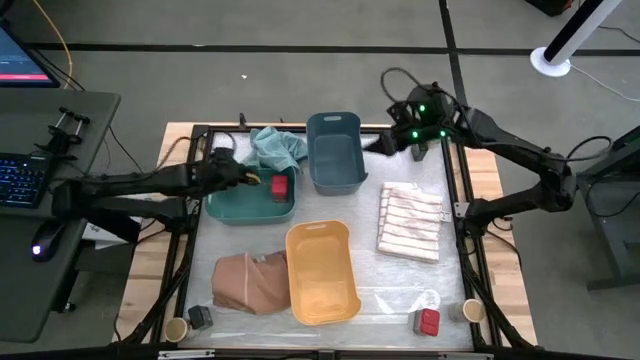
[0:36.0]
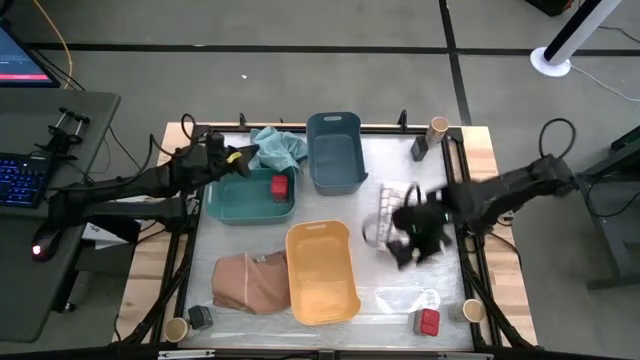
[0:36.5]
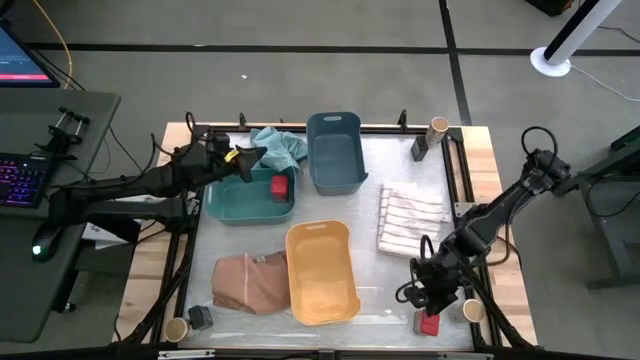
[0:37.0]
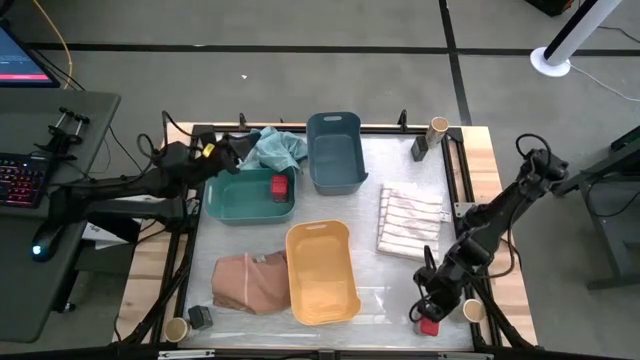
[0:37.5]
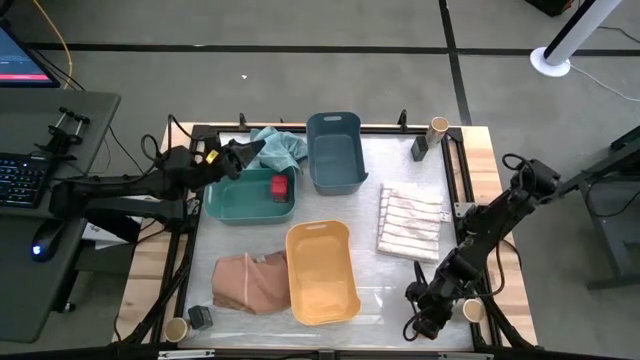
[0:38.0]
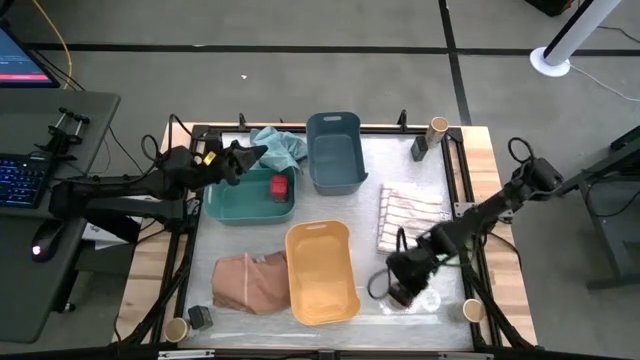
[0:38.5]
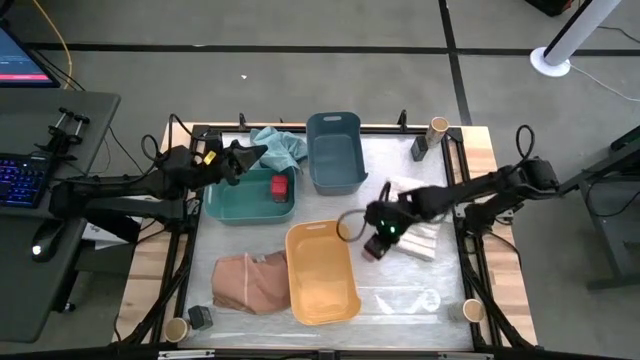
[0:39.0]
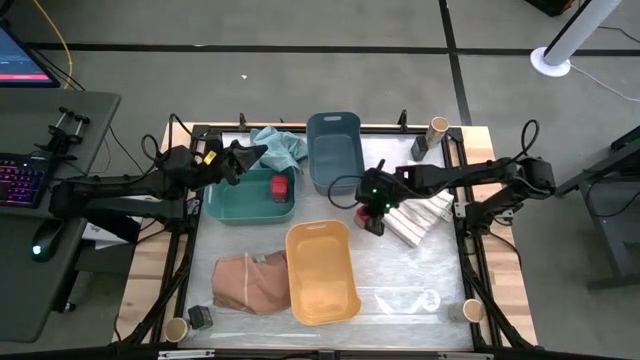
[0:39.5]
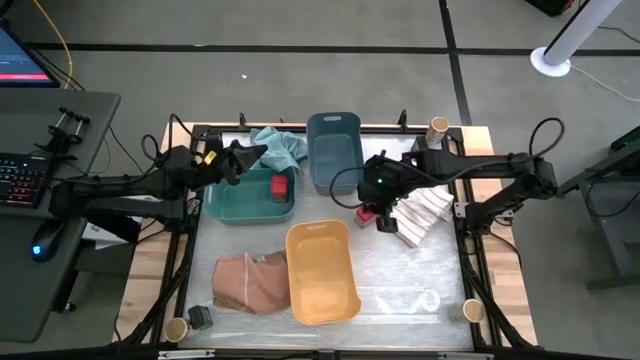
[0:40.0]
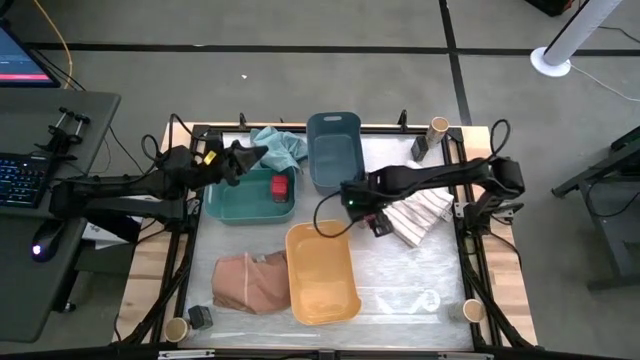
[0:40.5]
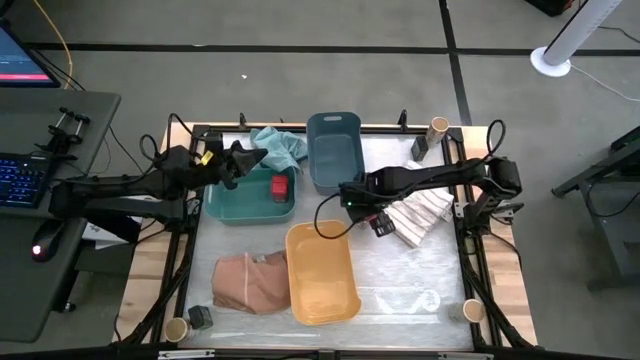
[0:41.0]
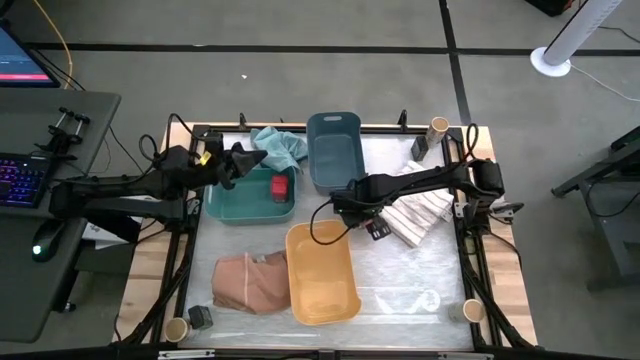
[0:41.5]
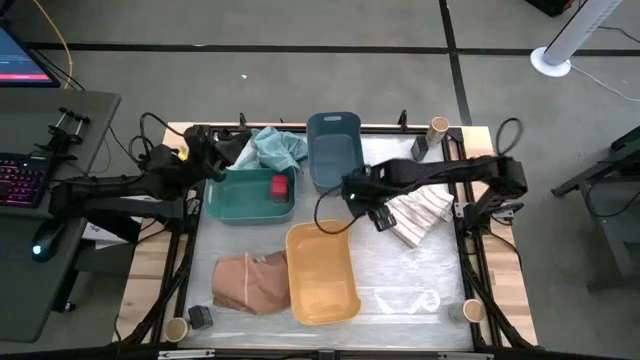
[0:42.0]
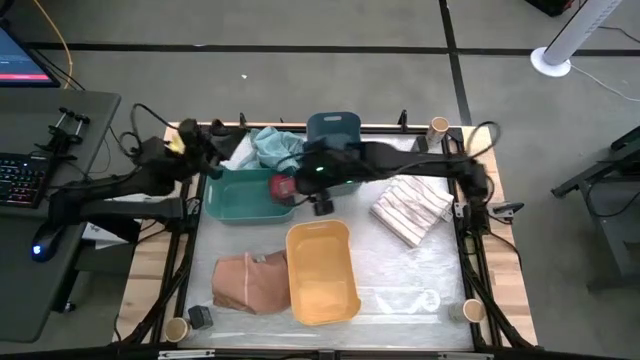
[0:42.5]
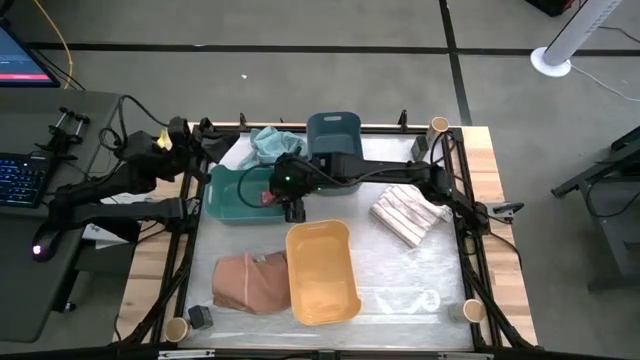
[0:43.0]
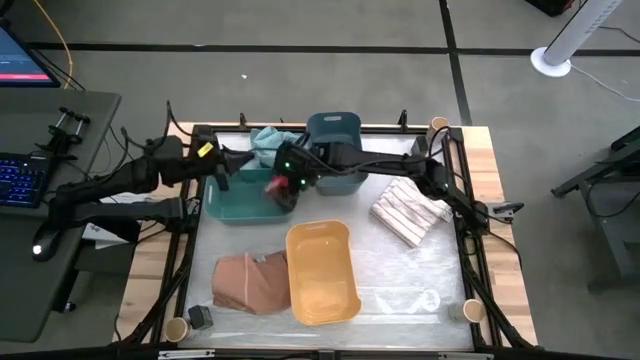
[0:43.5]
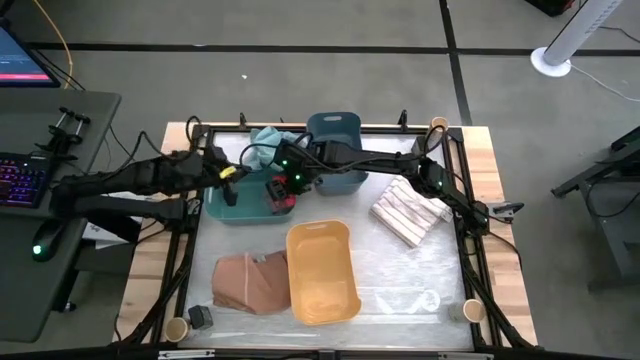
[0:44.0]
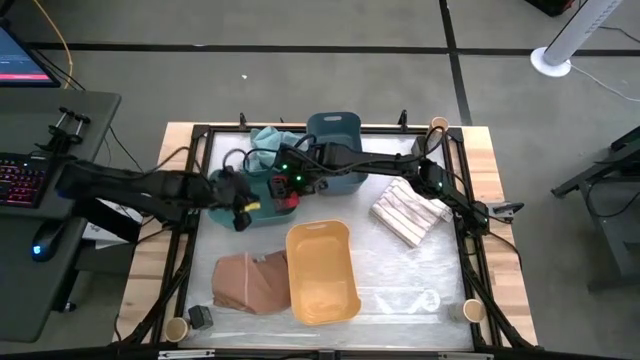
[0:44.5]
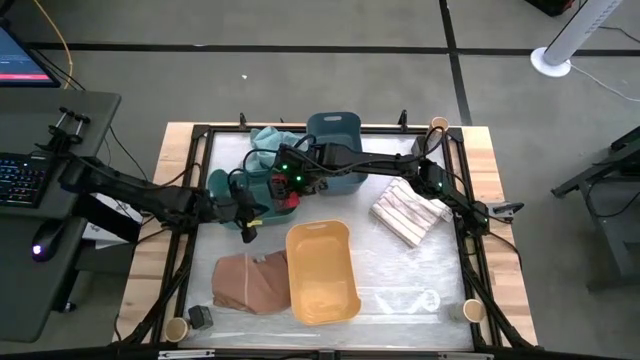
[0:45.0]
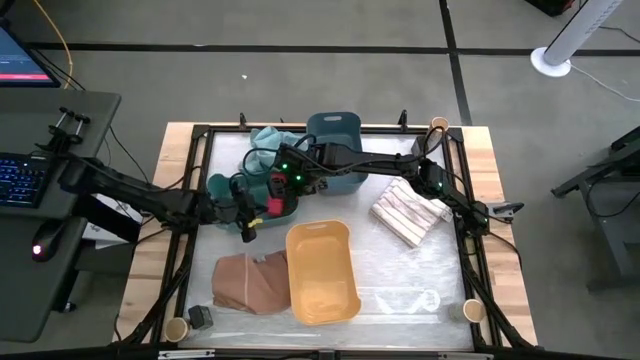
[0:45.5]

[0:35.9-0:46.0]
Task: Sort spices by type
Put the red seasoning can into the green bin

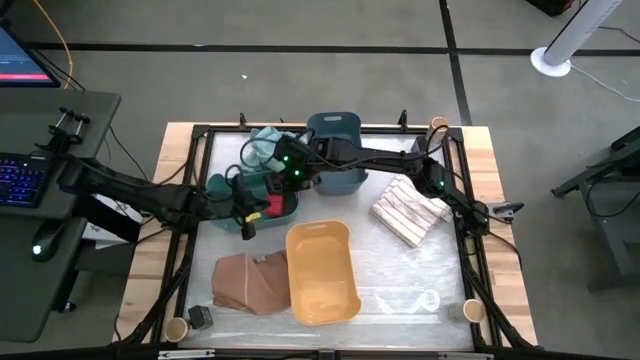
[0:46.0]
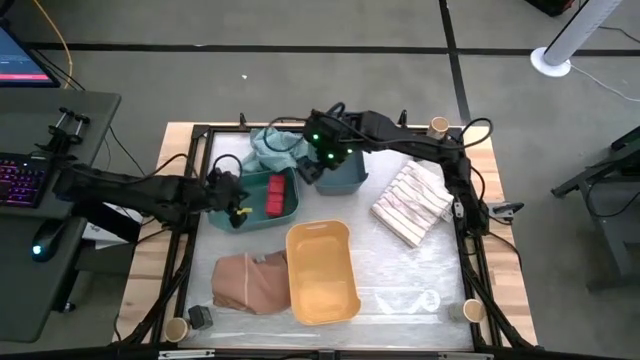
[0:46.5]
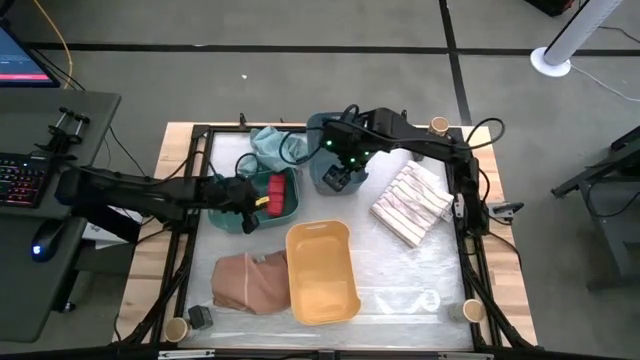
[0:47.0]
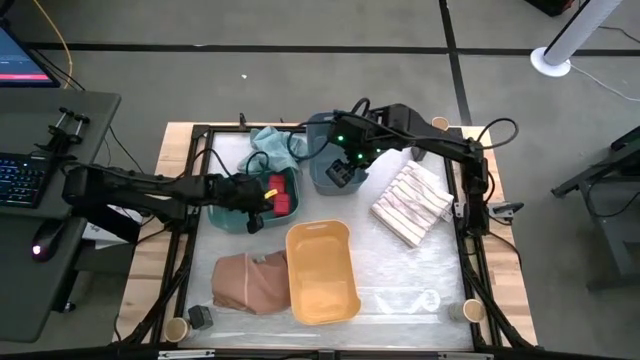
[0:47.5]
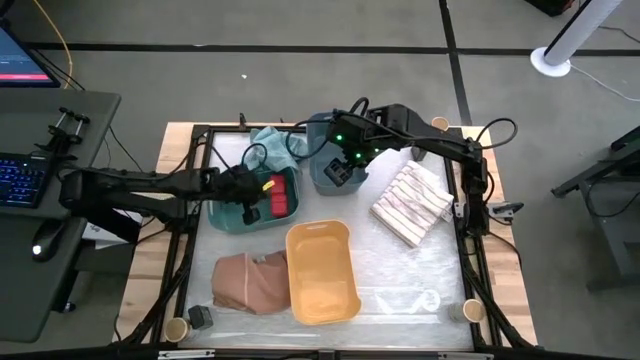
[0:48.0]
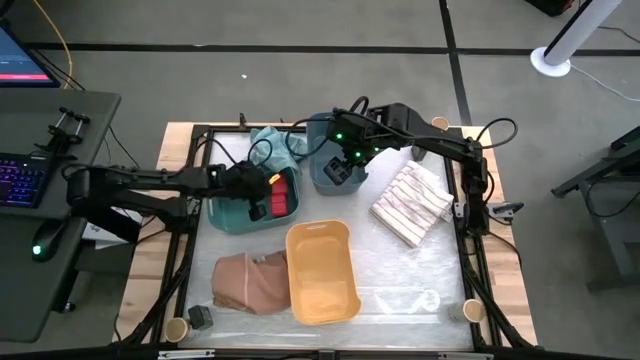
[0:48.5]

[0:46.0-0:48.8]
Adjust the red seasoning cans on the green bin

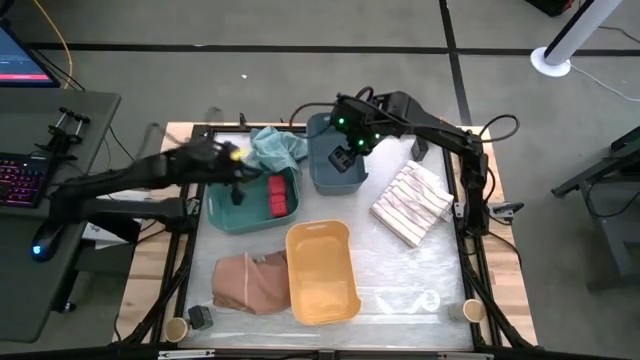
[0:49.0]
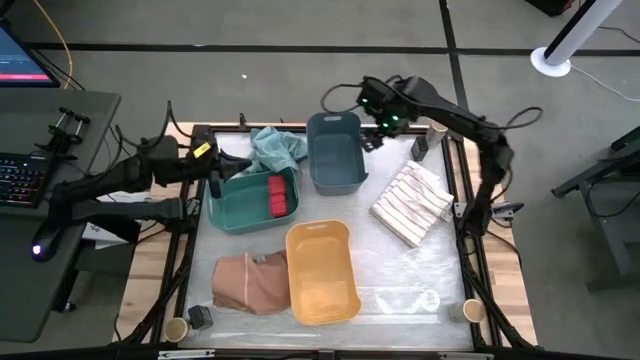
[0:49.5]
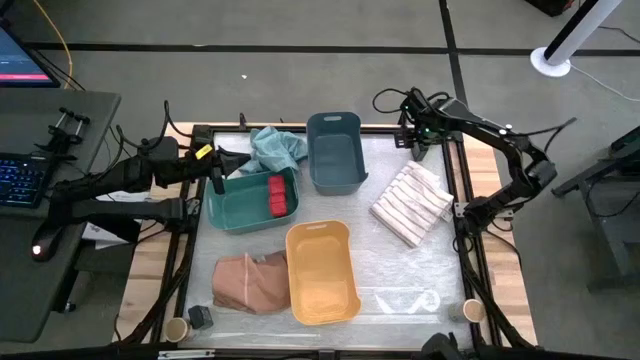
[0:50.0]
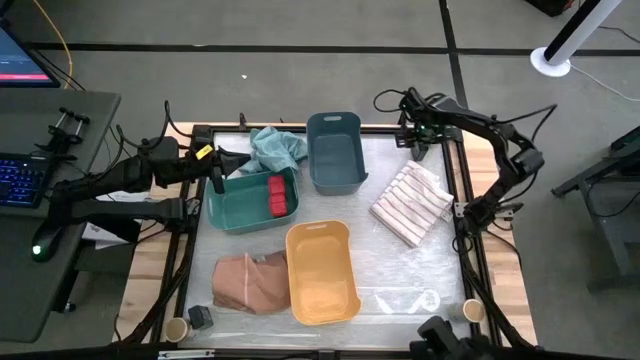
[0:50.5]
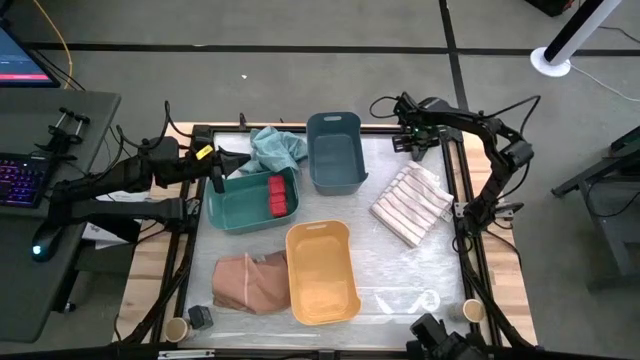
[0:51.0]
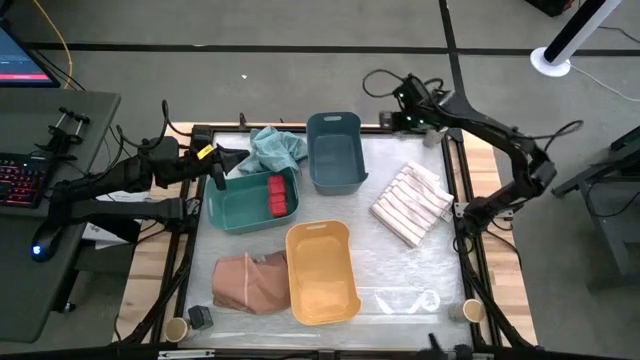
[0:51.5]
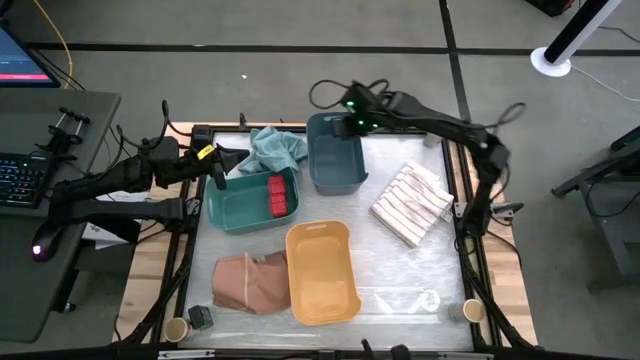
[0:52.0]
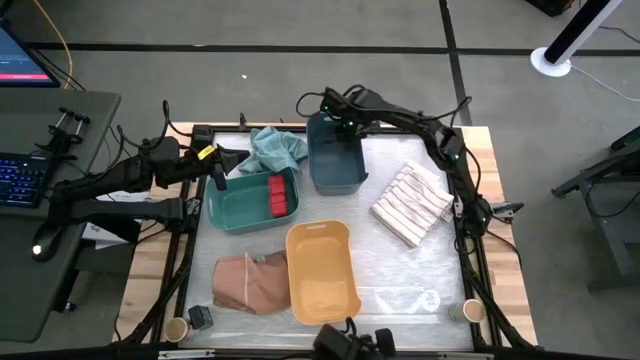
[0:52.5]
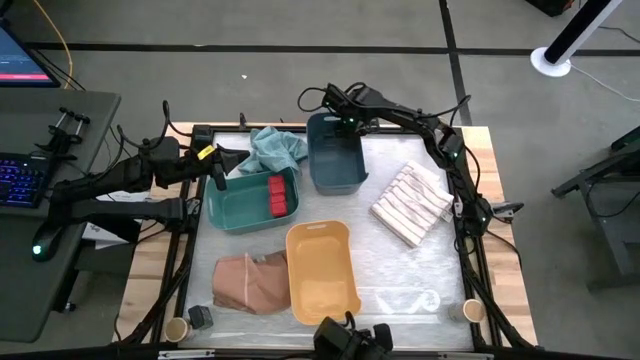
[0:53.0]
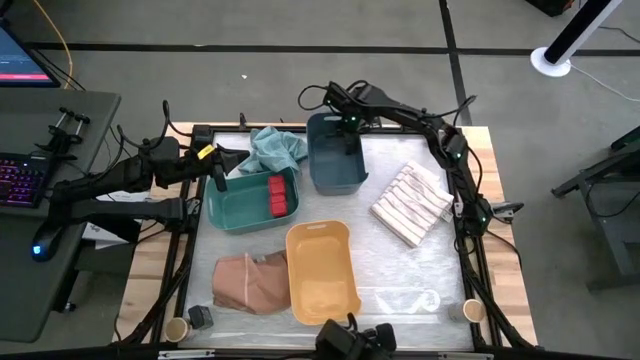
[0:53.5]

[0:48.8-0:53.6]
Put the top black seasoning can into the blue bin

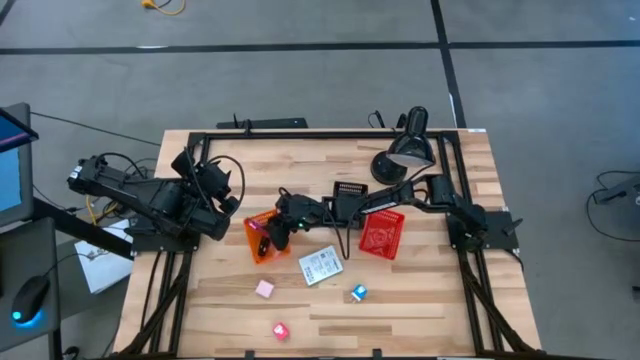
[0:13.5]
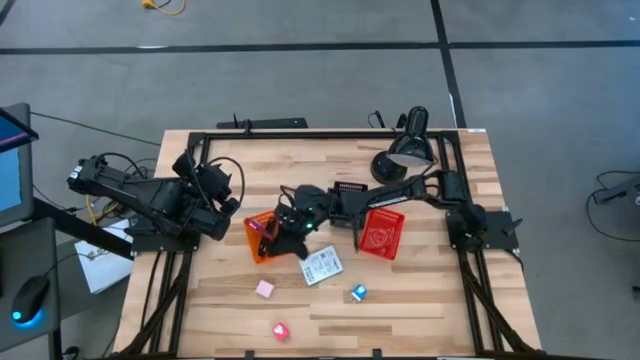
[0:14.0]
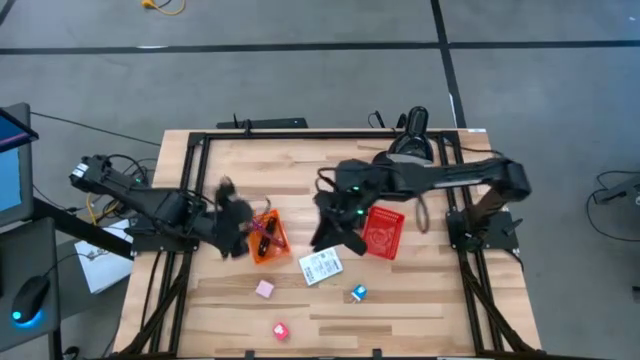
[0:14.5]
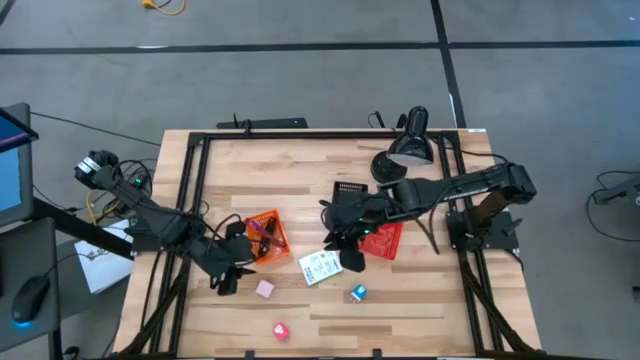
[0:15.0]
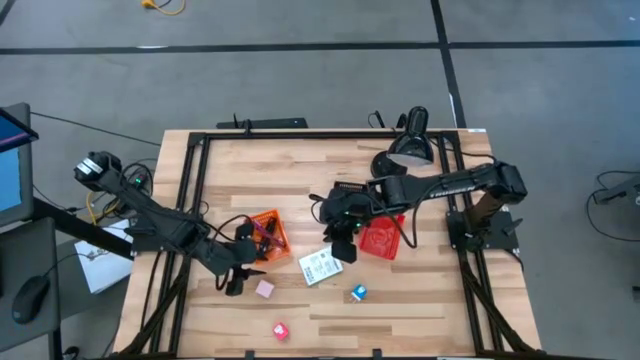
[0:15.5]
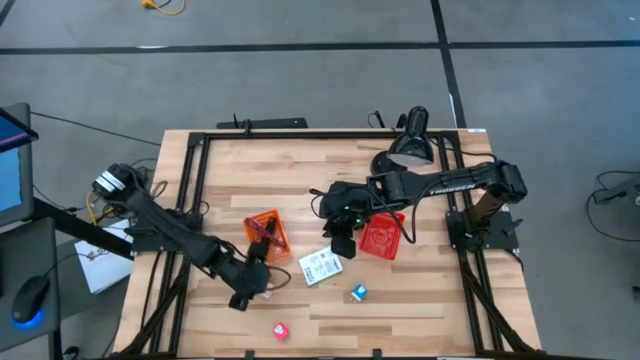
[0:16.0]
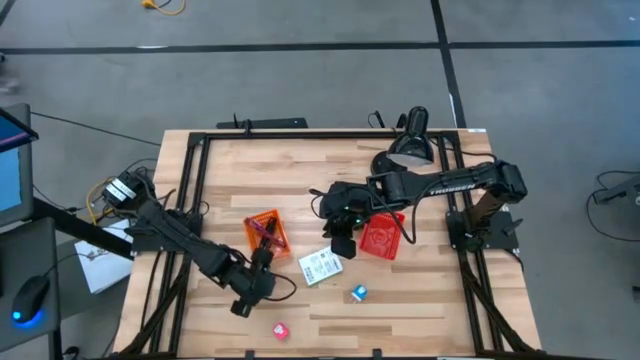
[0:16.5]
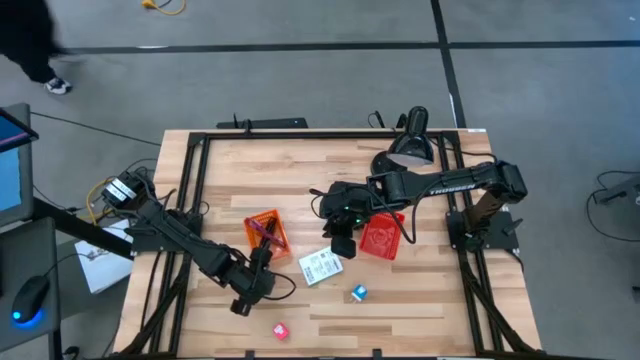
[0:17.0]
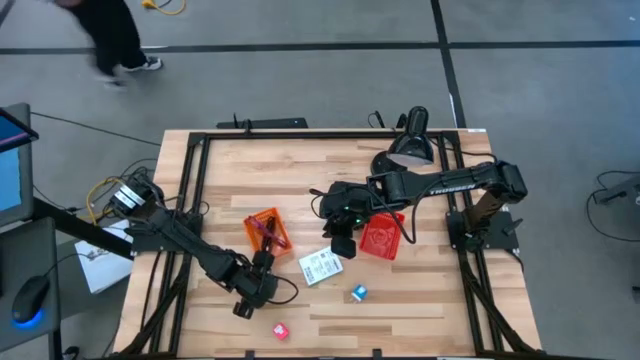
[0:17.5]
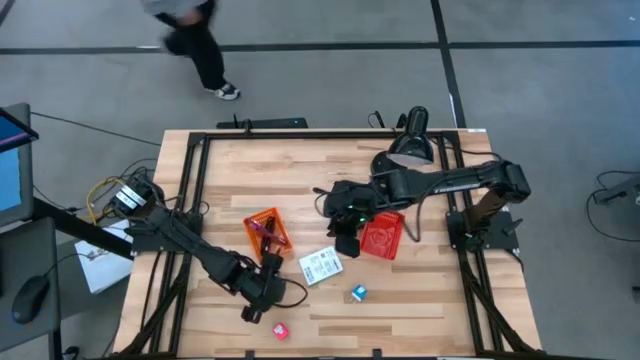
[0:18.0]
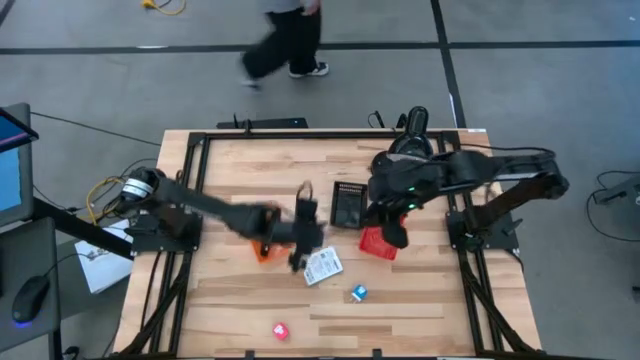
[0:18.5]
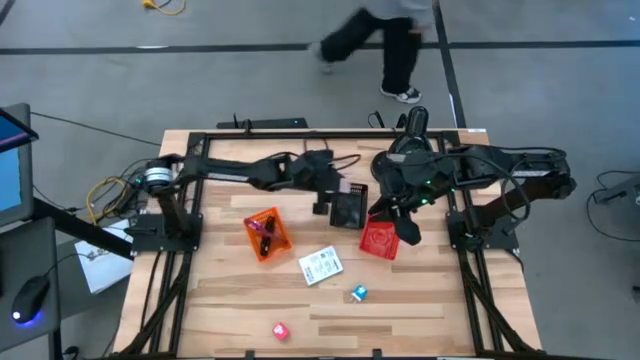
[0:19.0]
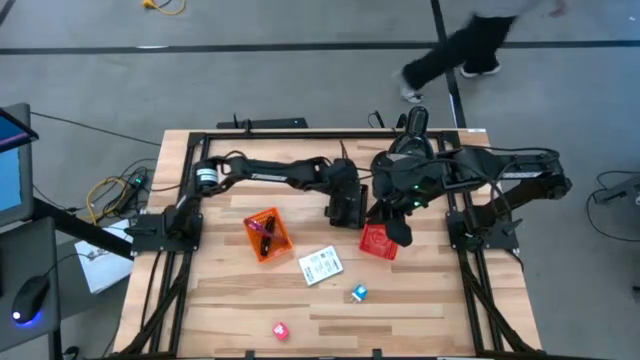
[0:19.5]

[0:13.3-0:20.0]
Task: Pick and place items into bin
Put the white charger adapter into the black bin
